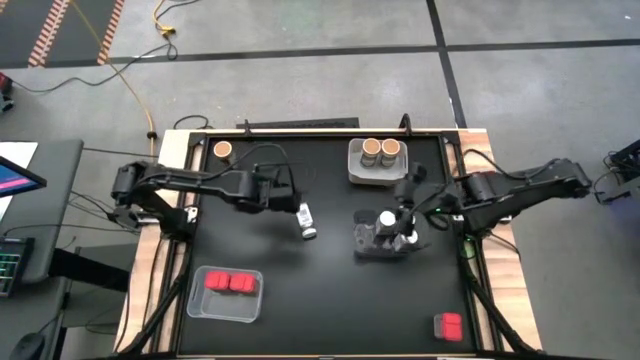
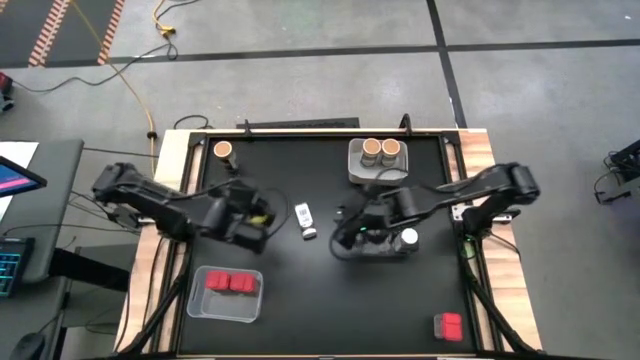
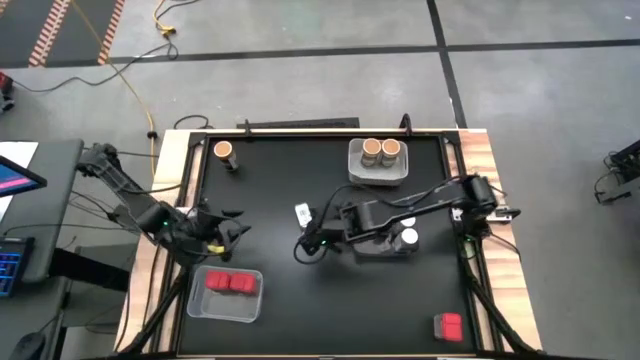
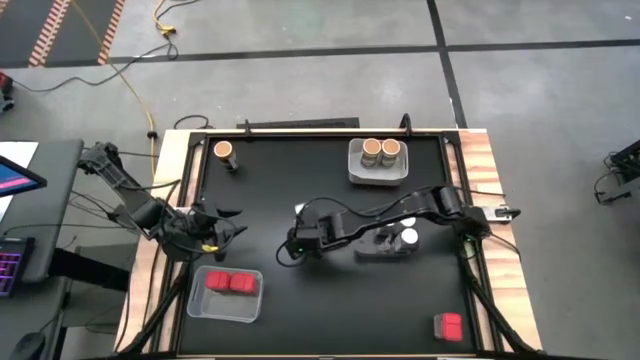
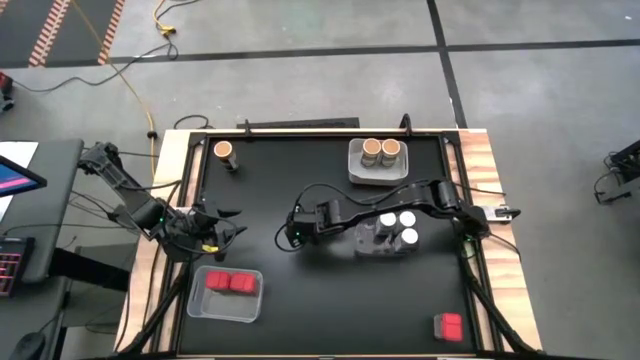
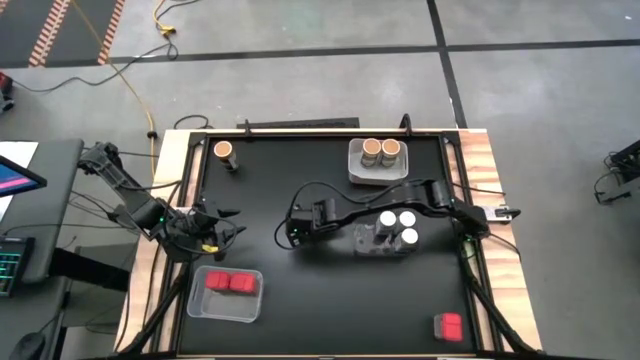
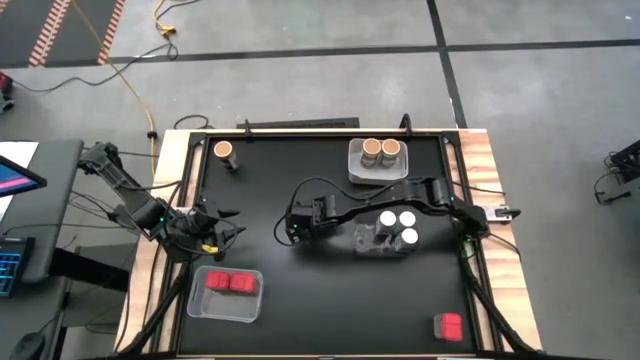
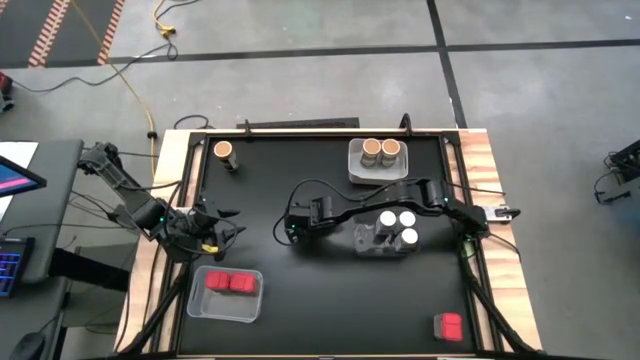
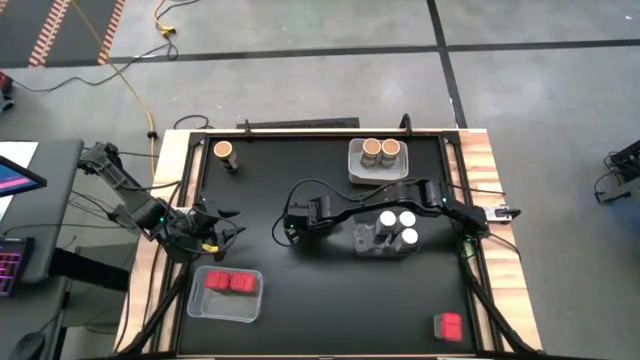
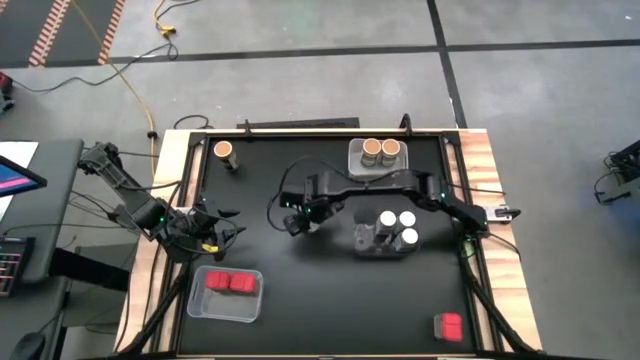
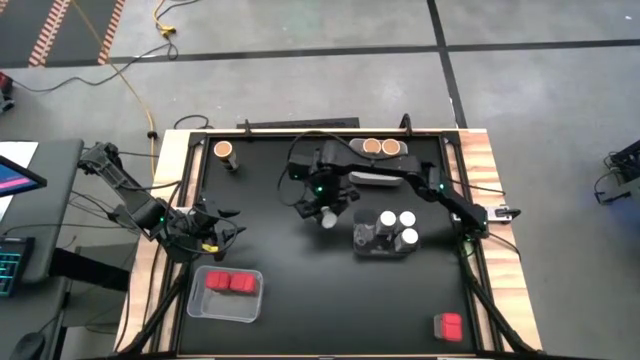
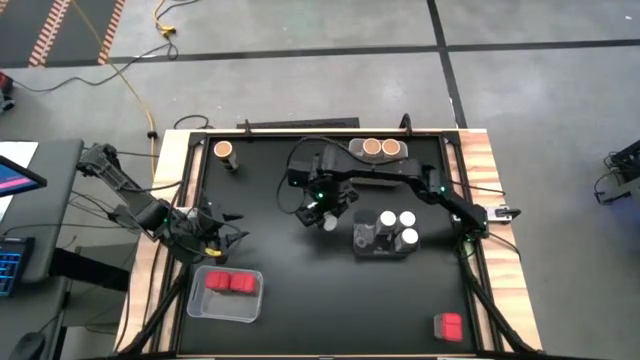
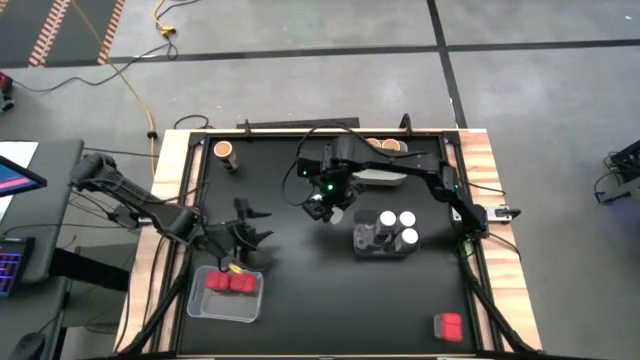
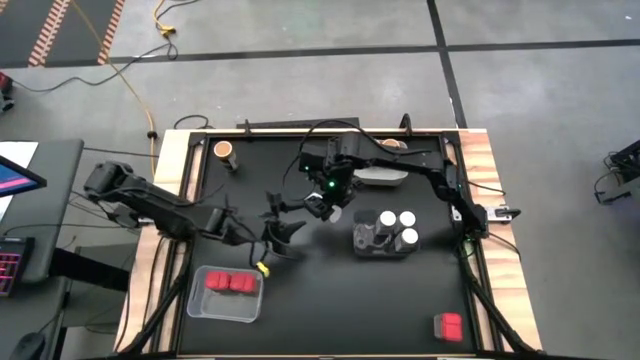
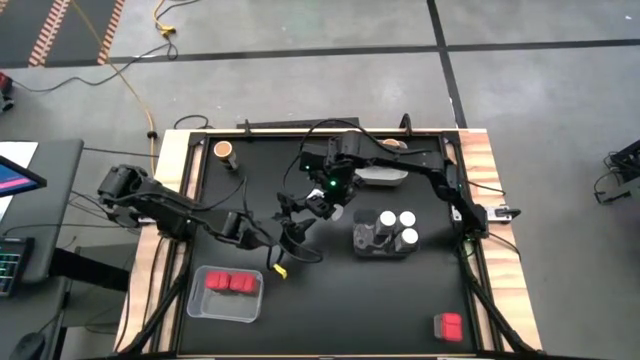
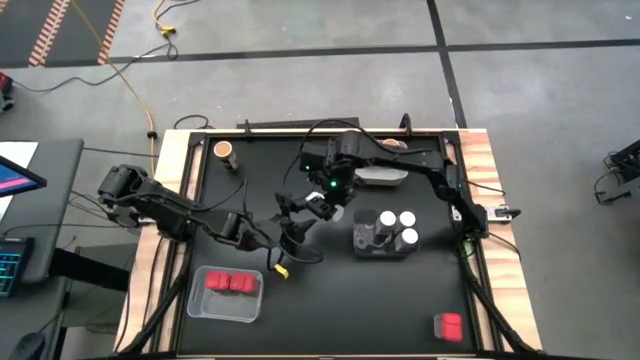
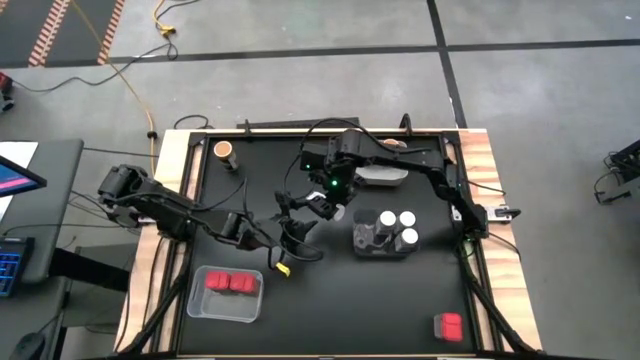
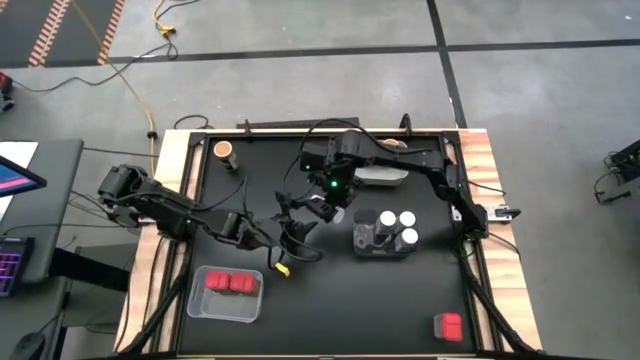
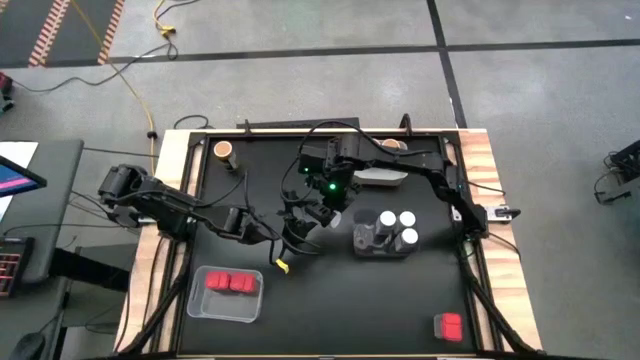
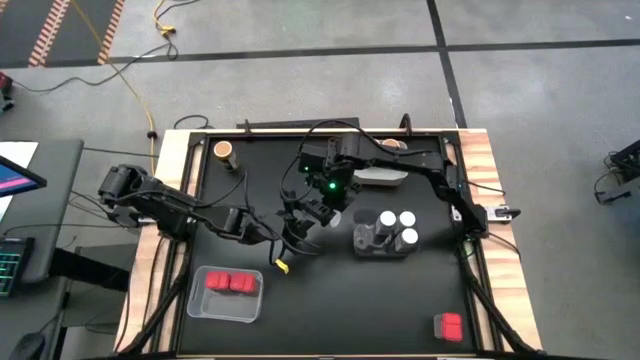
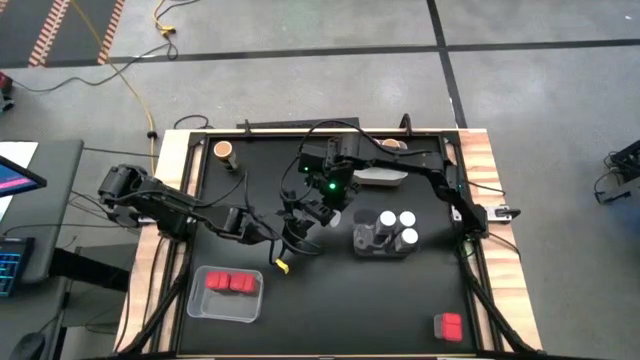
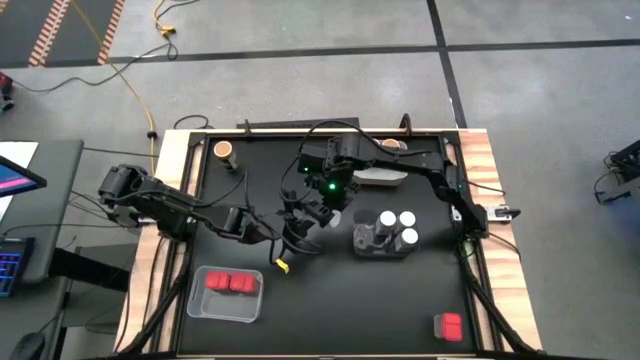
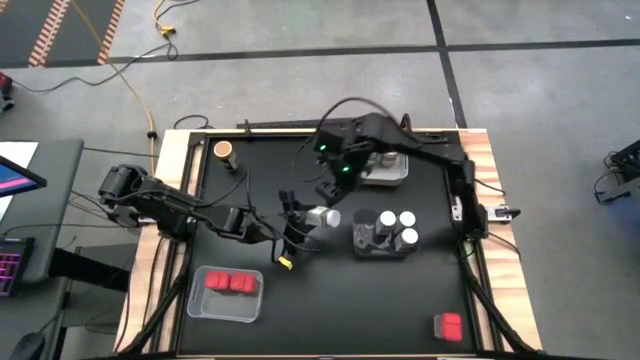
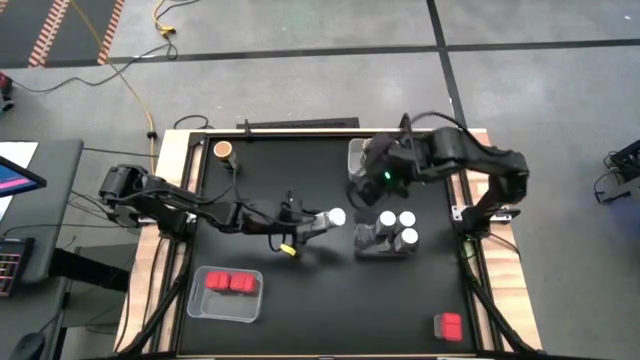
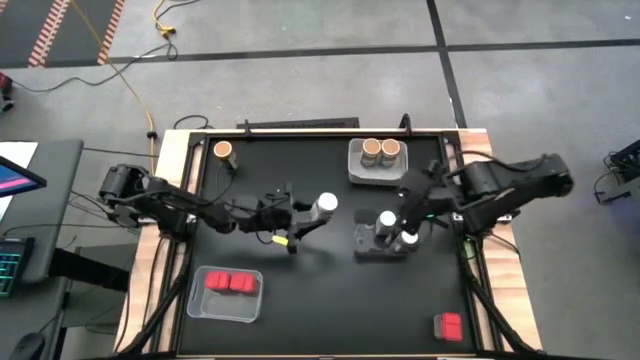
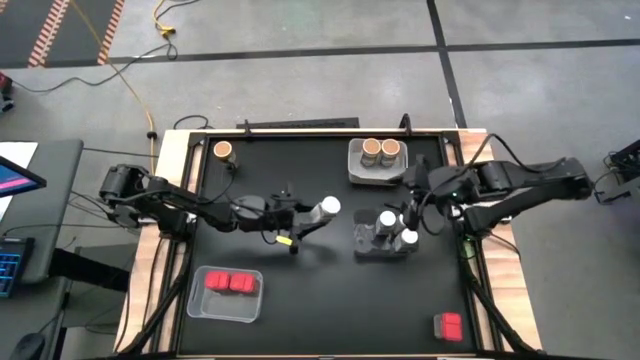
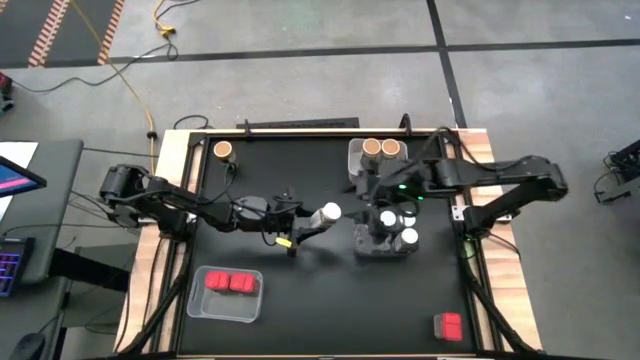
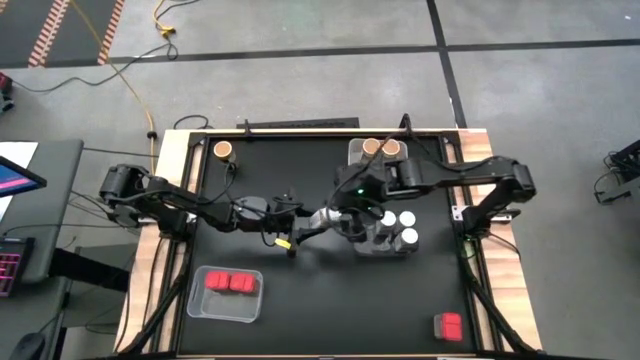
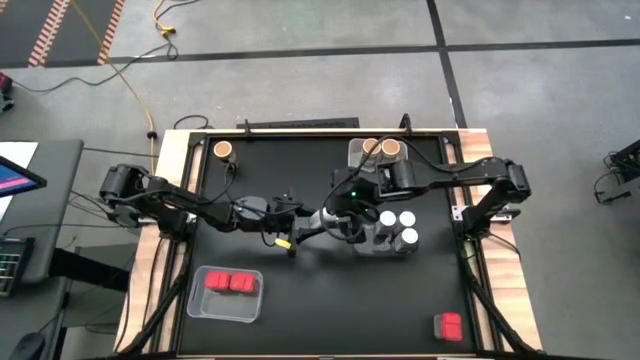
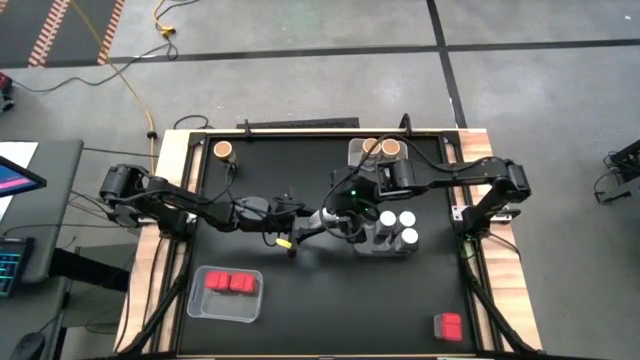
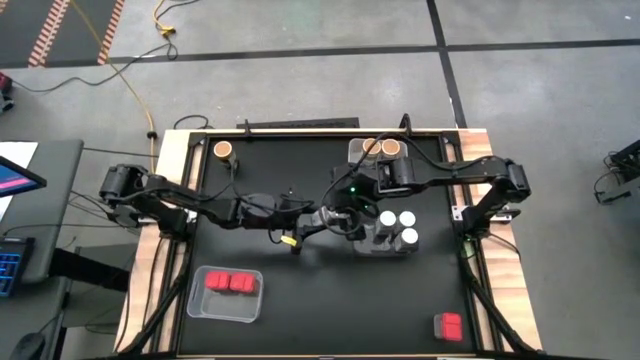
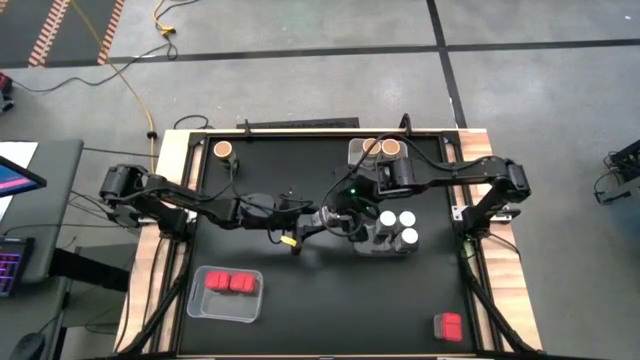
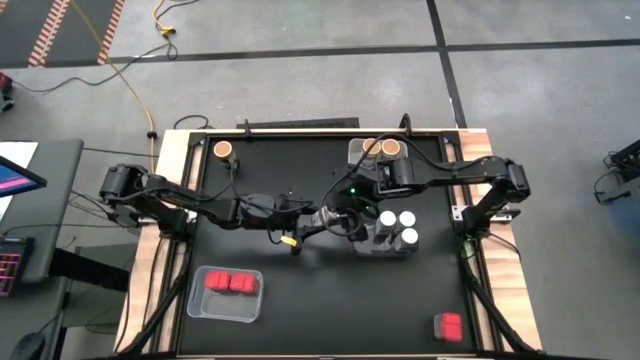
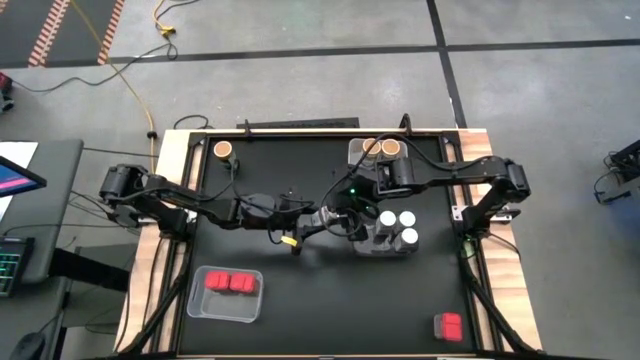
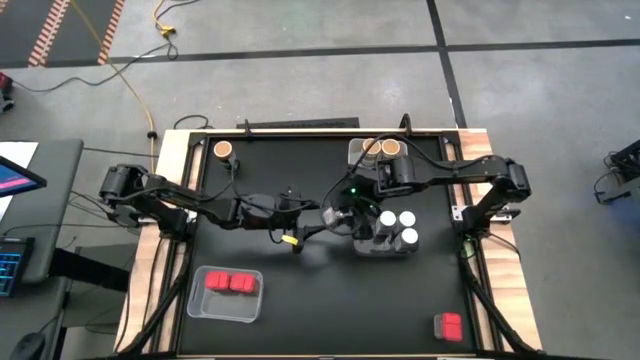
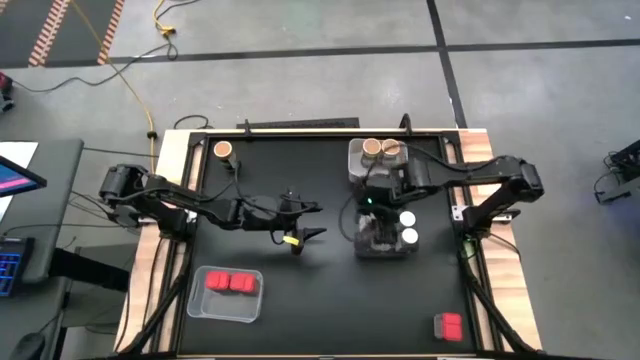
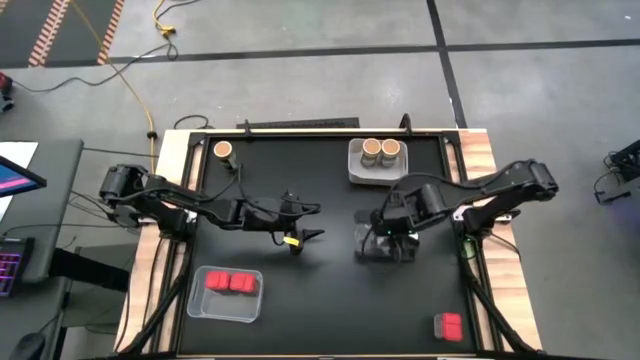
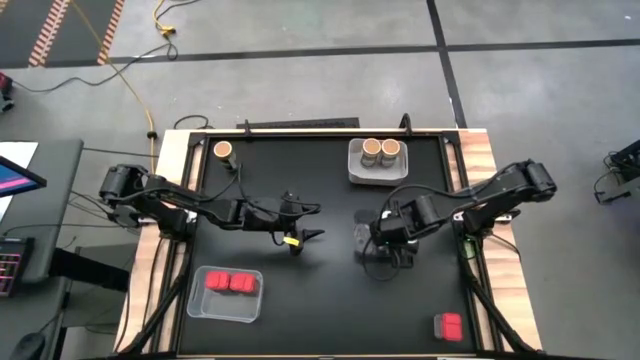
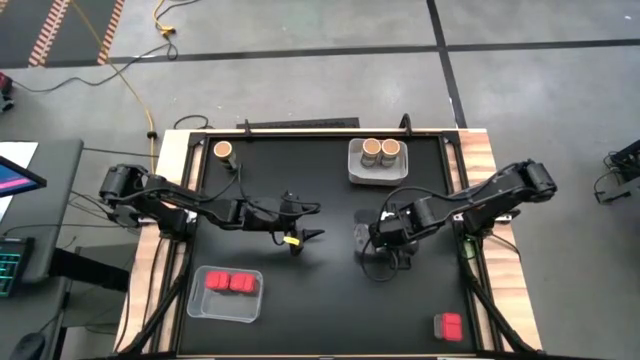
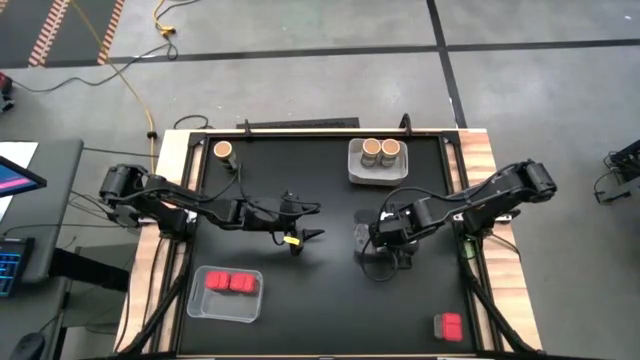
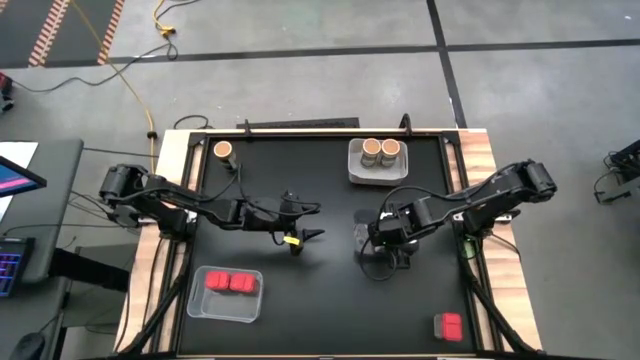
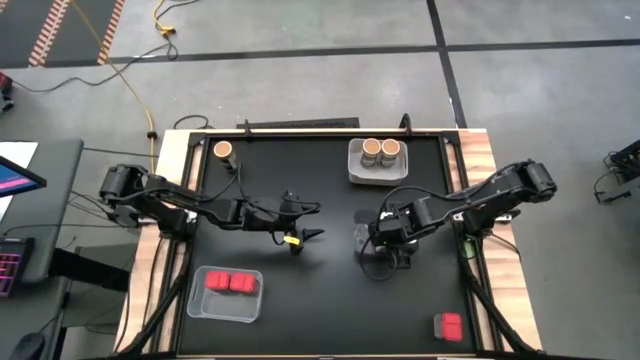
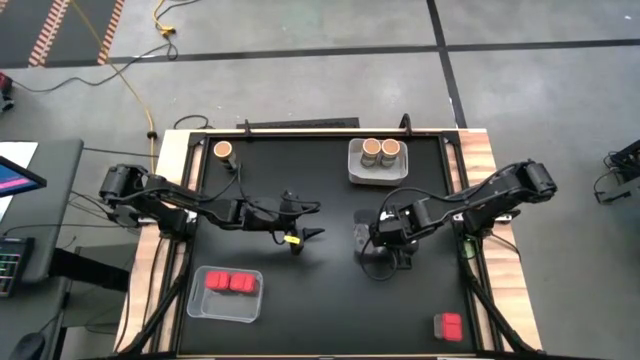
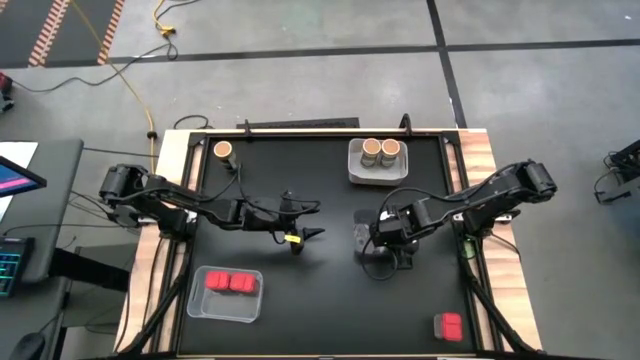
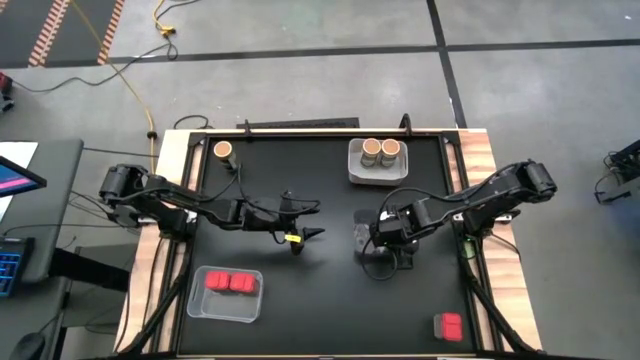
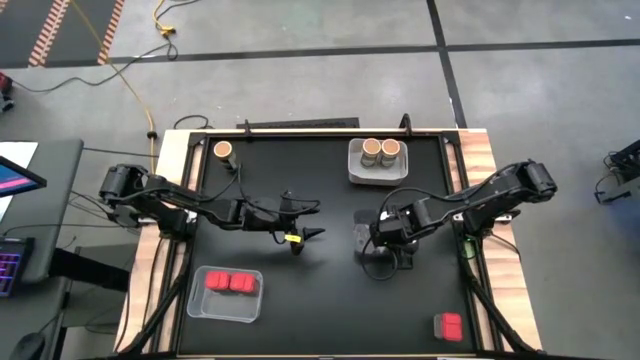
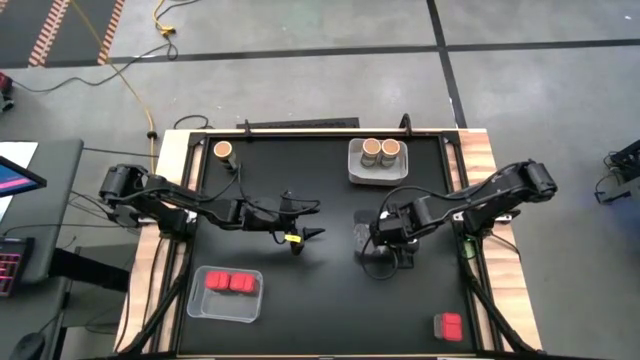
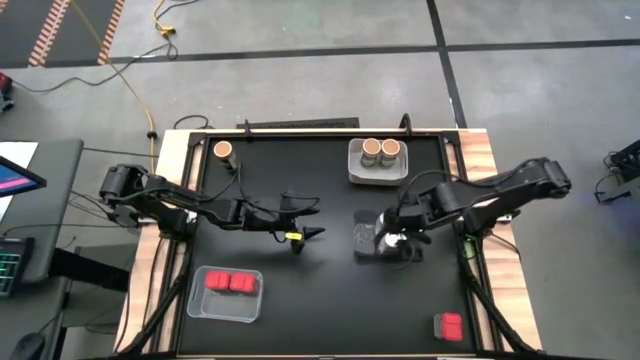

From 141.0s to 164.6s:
Task: Sort spices by type
Put the white spice bottle in the black bin
